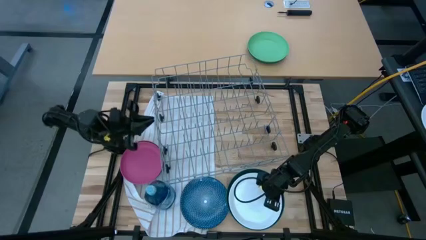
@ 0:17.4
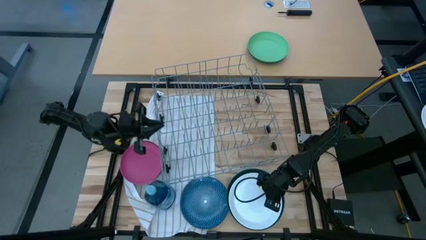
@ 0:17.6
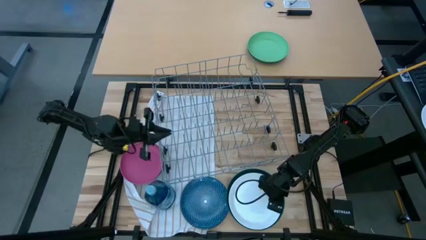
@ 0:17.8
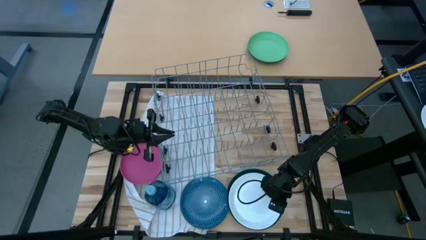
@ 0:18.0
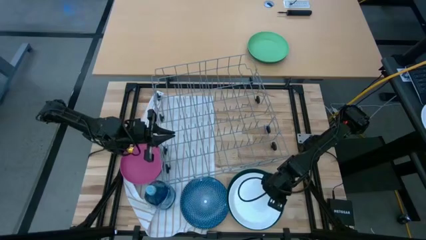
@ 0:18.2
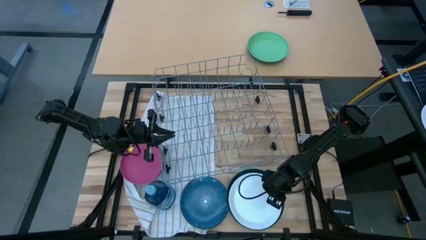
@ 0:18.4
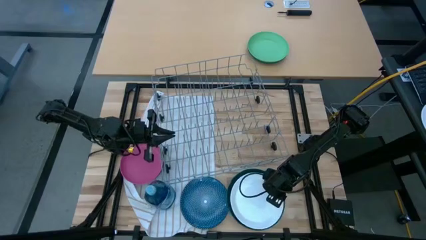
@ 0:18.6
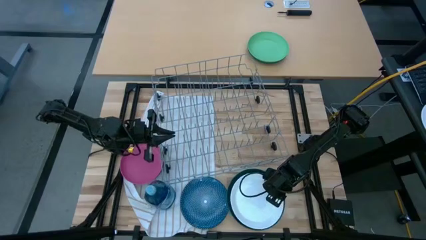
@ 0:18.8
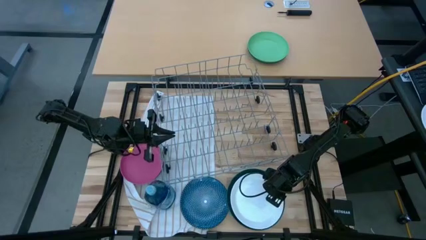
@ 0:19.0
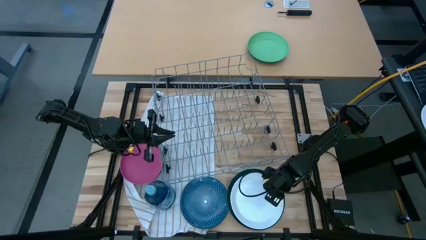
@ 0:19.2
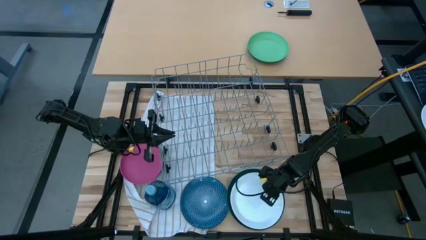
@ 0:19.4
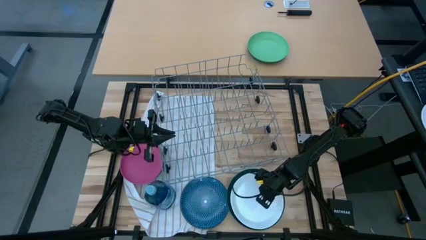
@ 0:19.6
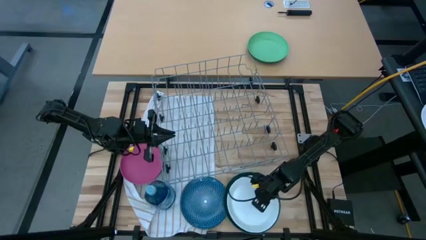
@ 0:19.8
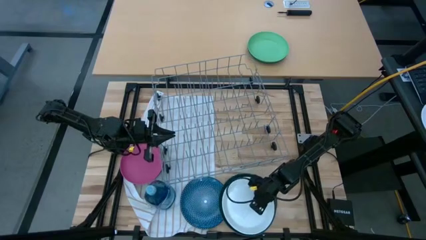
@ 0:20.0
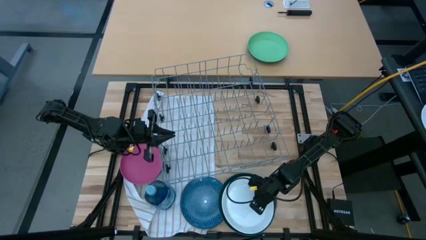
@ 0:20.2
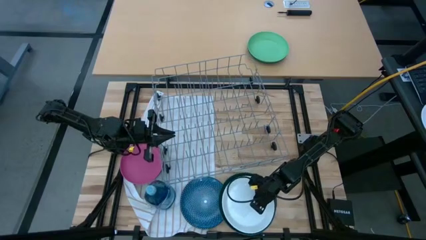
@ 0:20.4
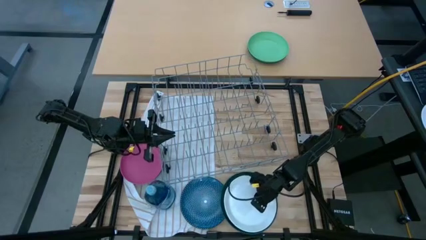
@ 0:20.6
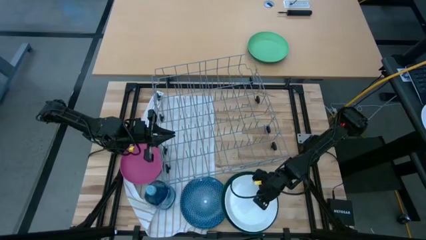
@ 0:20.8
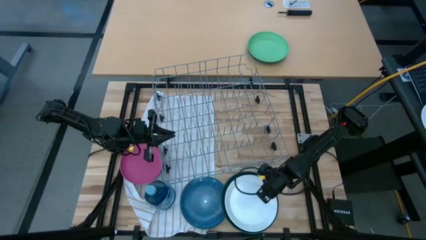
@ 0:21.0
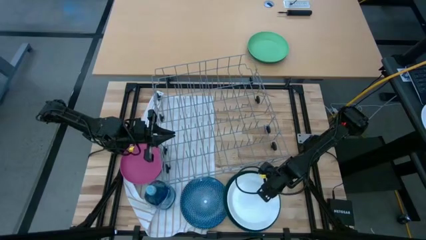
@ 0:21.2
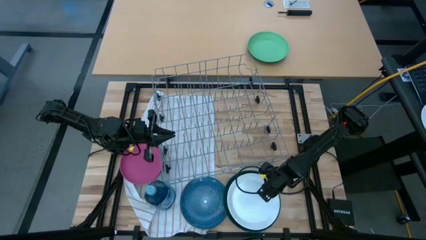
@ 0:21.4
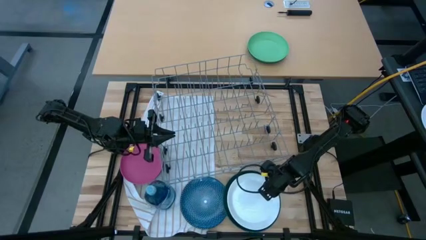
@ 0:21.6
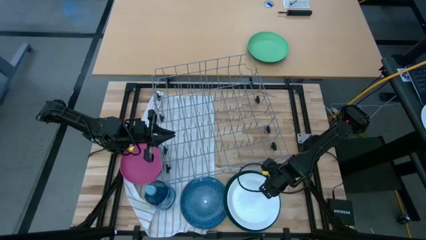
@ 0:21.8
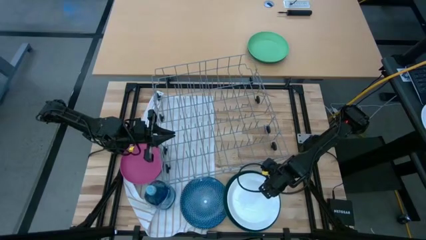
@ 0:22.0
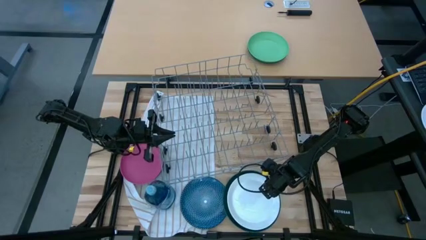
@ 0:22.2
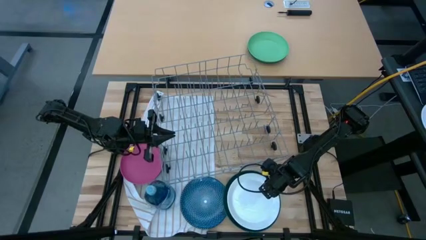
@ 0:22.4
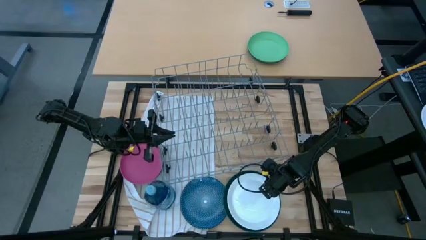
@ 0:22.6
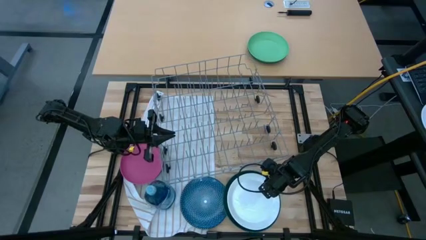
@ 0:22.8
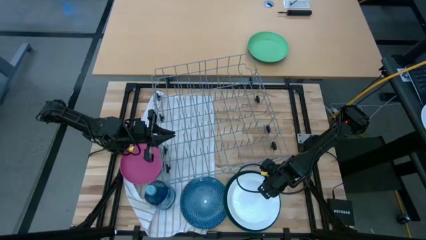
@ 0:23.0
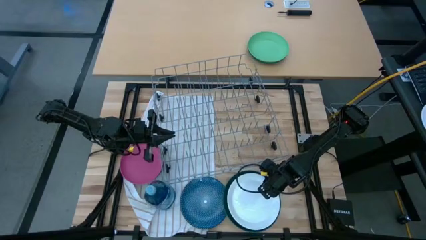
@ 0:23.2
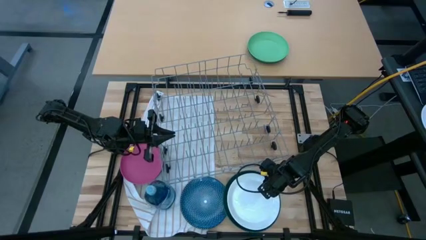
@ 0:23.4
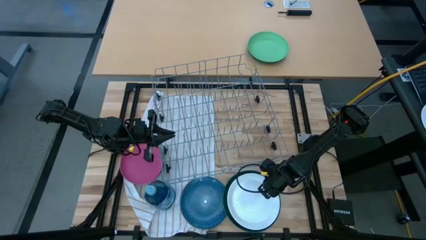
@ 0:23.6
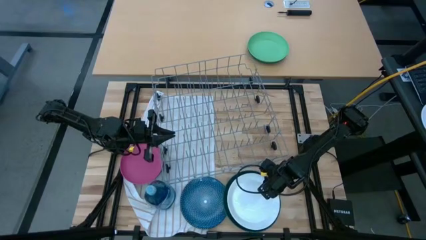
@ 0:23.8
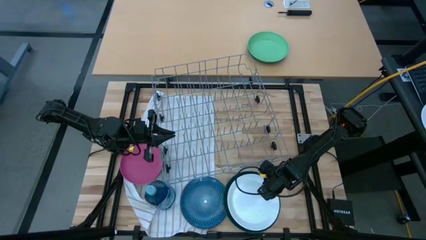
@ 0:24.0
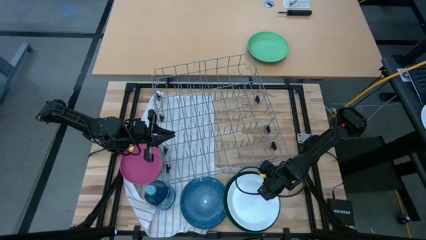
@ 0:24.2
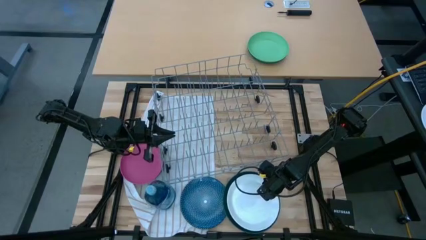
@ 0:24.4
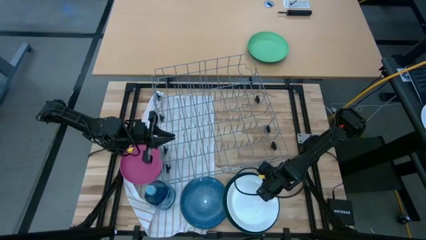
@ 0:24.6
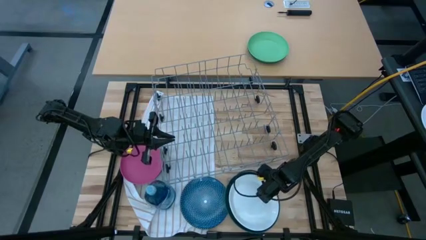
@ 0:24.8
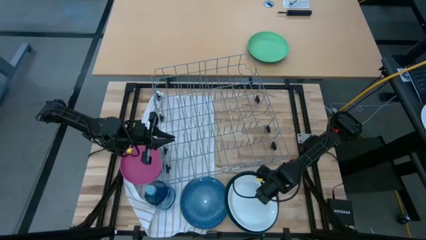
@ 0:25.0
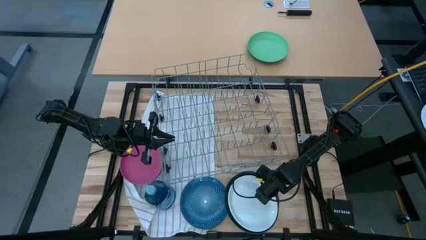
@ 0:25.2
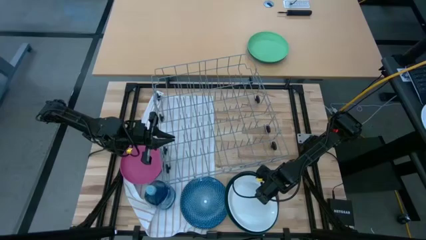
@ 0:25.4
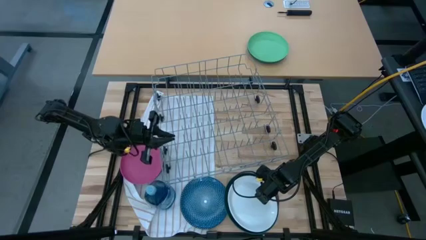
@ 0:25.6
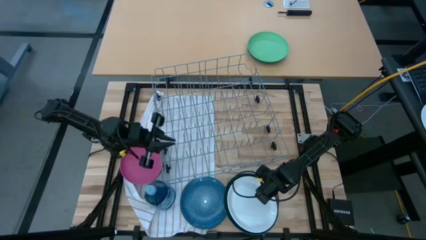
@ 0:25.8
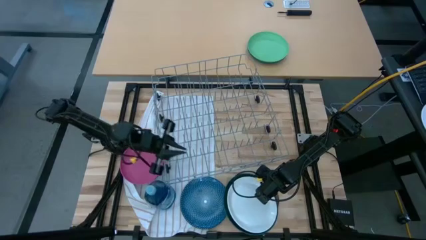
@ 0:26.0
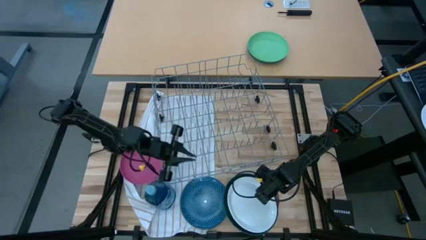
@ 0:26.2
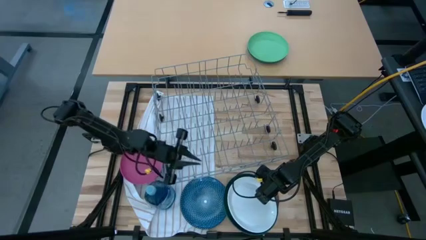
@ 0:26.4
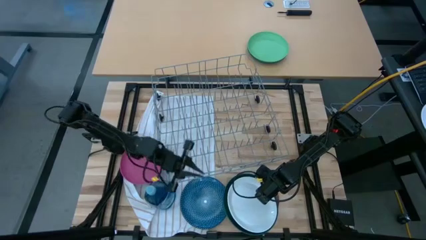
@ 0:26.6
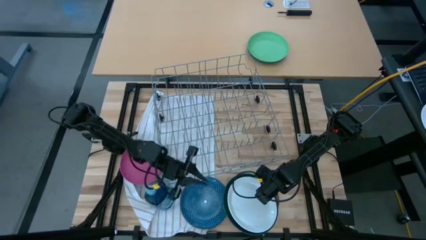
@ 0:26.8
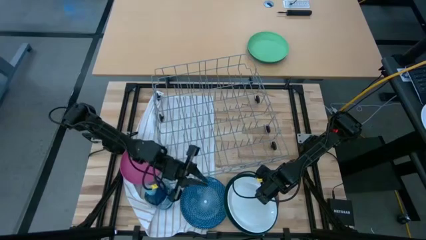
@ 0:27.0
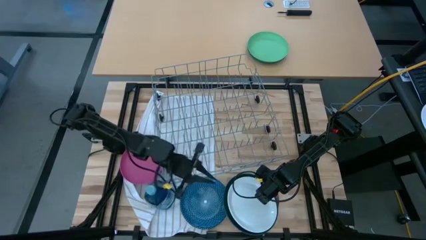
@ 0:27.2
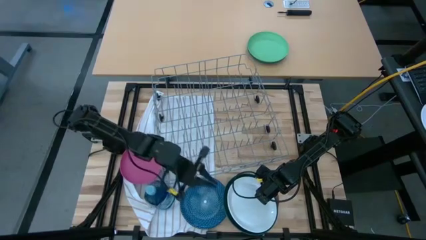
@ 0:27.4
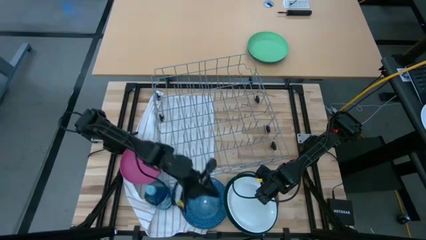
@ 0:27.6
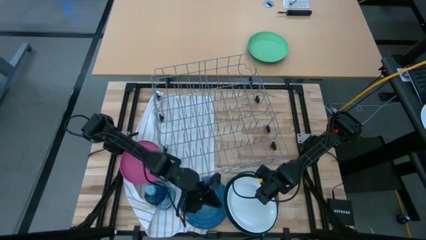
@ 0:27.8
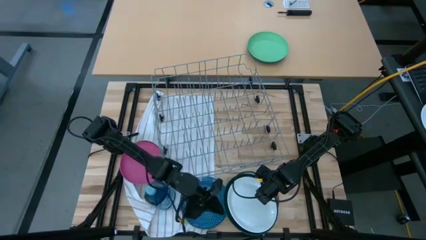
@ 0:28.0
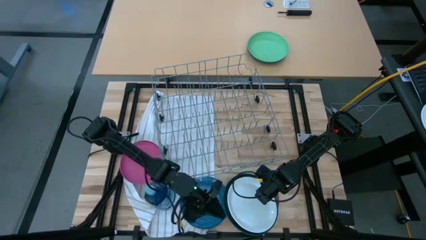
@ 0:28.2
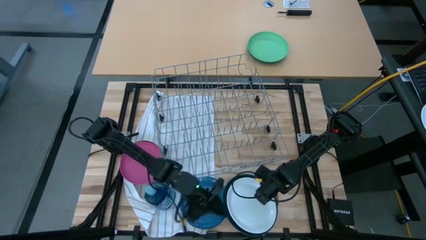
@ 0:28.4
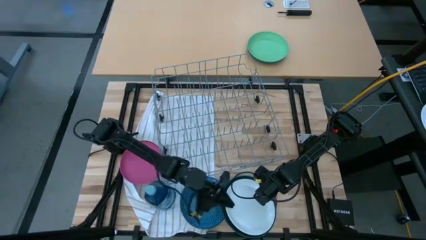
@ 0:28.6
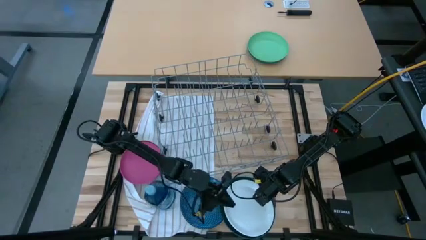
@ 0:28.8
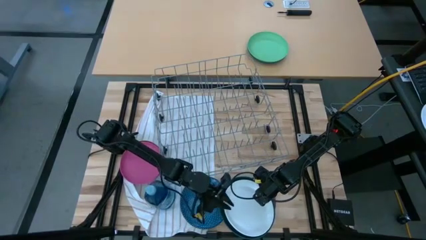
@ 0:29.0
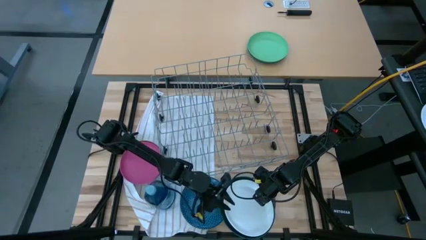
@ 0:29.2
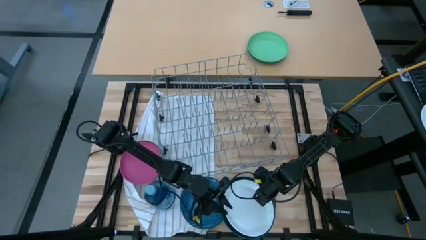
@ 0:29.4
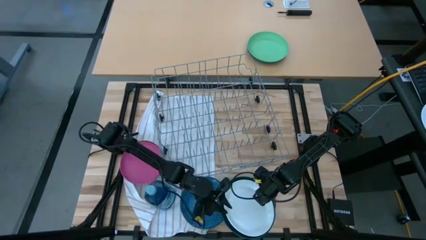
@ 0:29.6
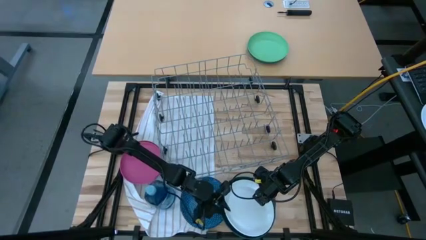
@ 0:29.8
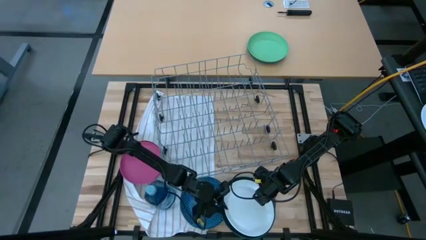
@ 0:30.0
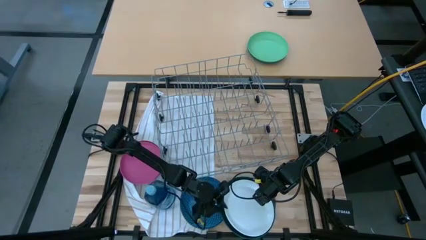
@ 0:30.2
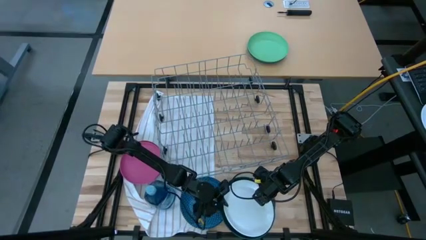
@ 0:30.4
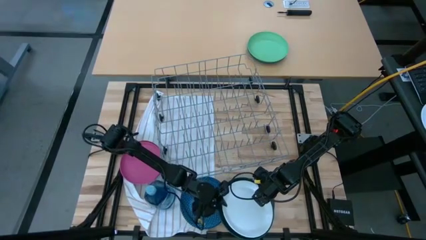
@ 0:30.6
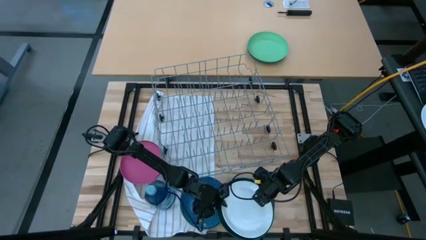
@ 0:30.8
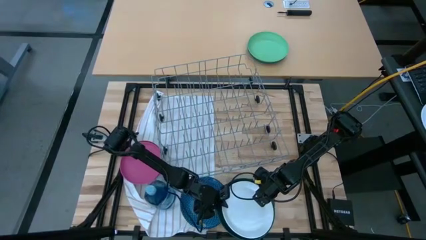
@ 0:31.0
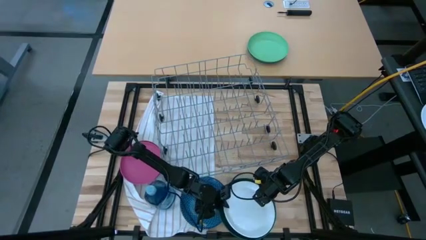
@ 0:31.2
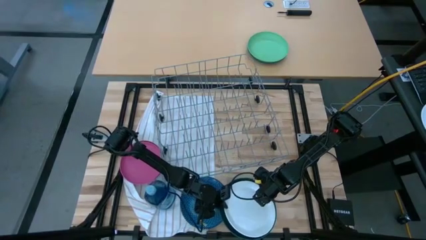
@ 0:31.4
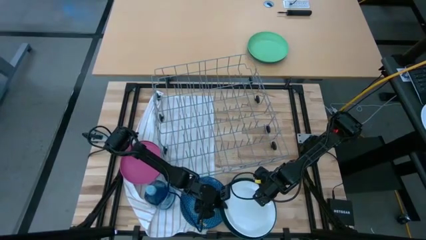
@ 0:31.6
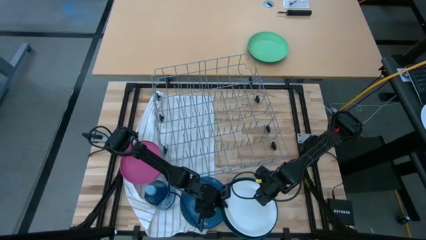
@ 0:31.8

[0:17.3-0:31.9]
Task: Sort dishes
Put the white plate into the dish rack
